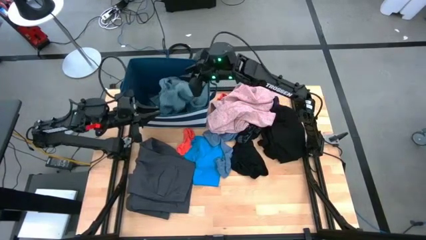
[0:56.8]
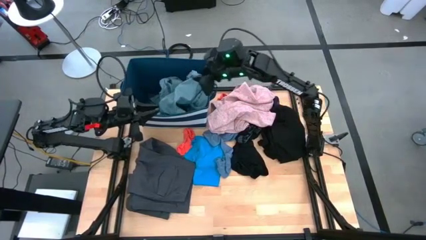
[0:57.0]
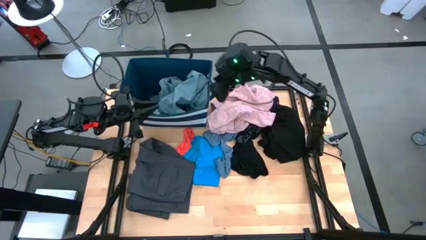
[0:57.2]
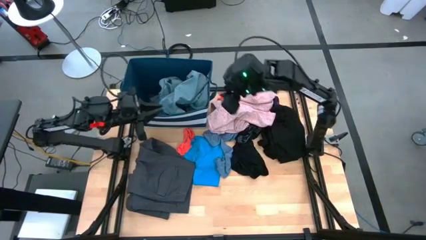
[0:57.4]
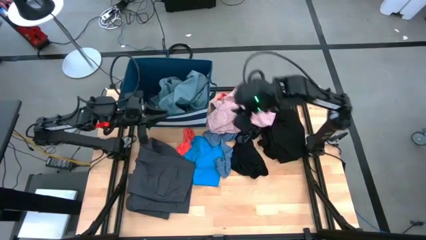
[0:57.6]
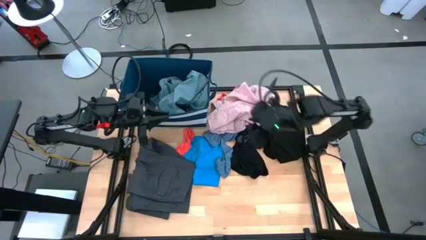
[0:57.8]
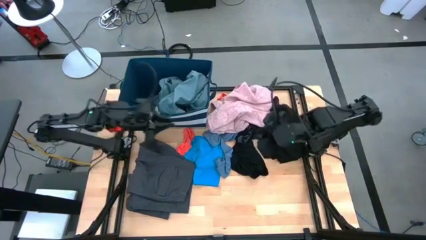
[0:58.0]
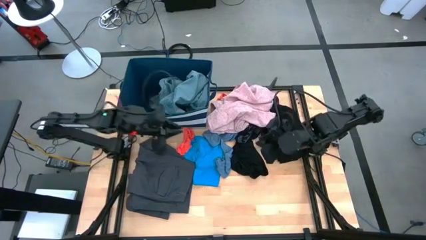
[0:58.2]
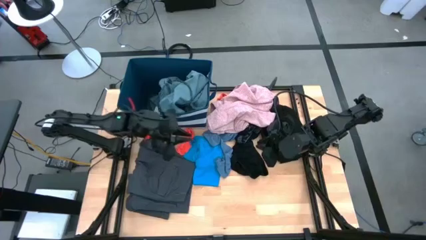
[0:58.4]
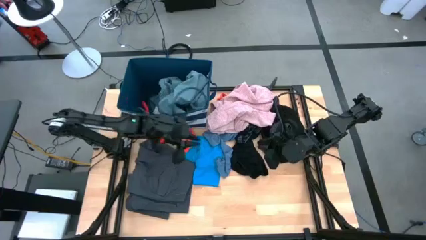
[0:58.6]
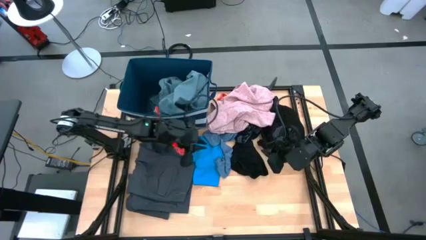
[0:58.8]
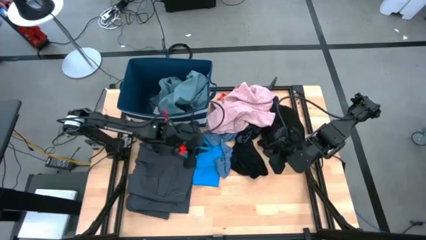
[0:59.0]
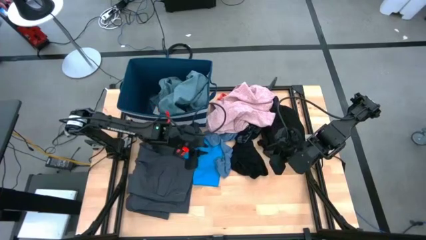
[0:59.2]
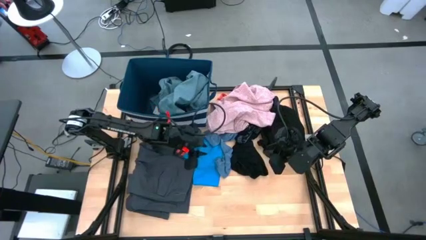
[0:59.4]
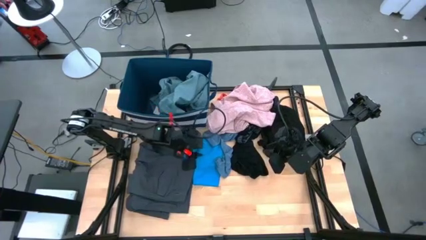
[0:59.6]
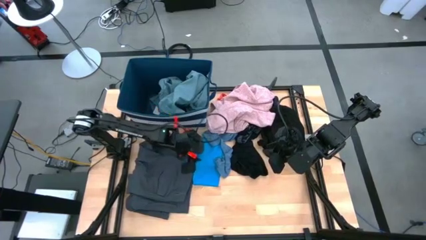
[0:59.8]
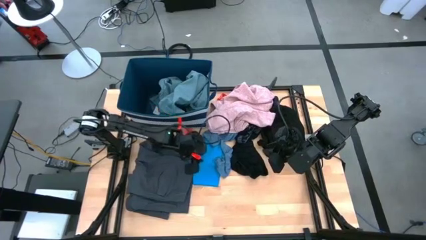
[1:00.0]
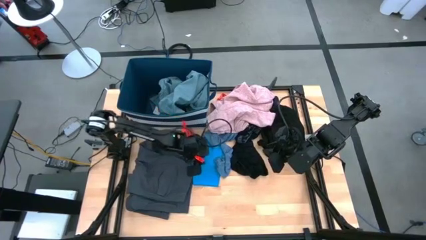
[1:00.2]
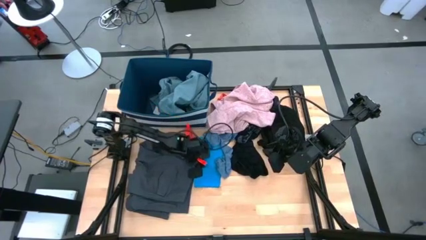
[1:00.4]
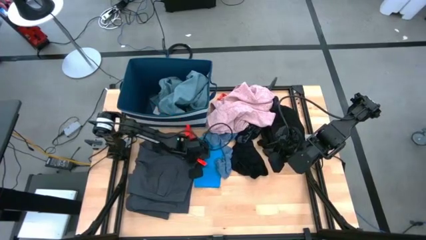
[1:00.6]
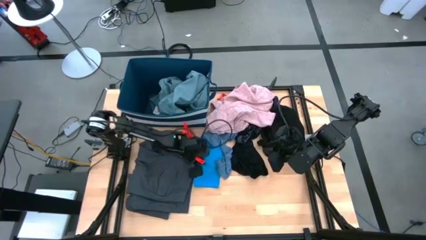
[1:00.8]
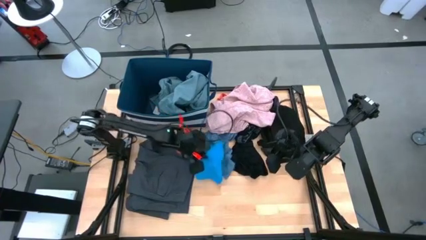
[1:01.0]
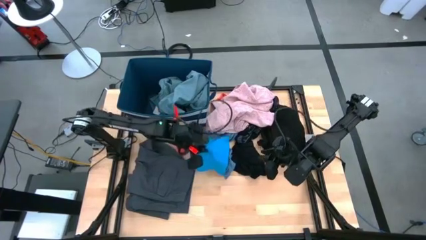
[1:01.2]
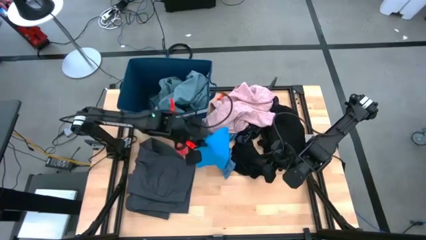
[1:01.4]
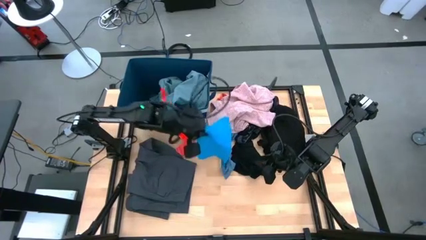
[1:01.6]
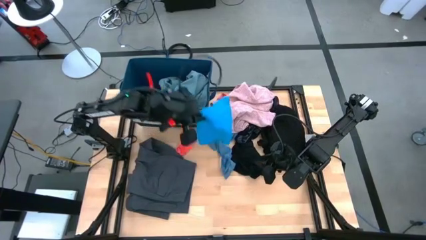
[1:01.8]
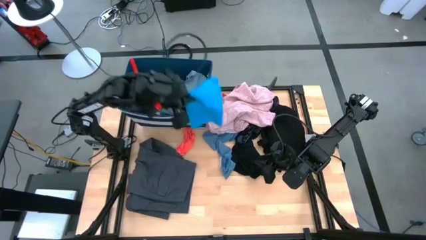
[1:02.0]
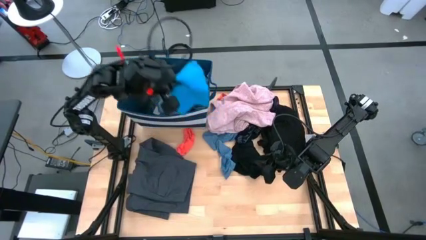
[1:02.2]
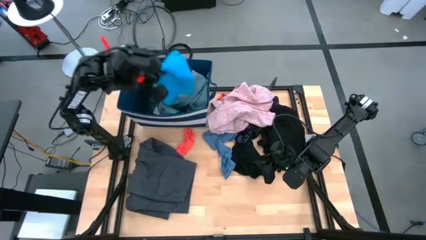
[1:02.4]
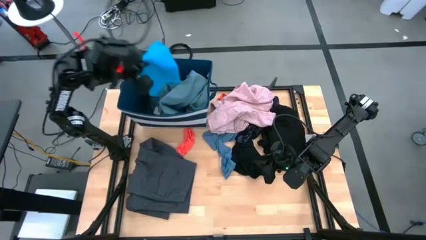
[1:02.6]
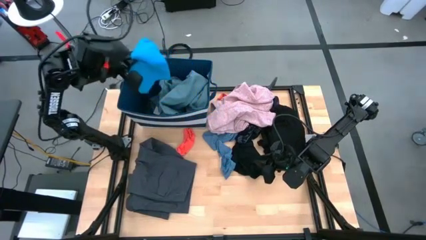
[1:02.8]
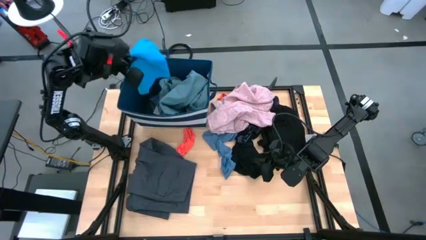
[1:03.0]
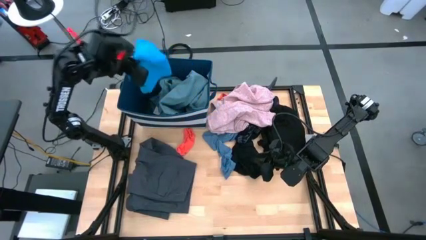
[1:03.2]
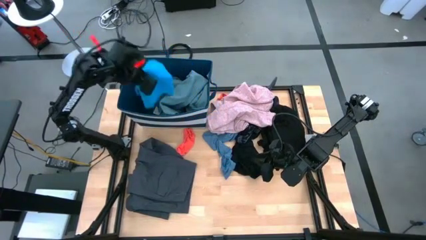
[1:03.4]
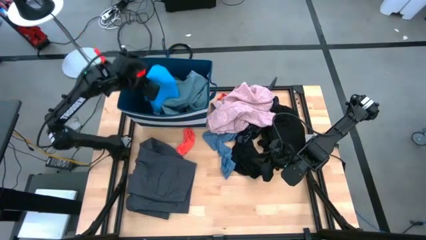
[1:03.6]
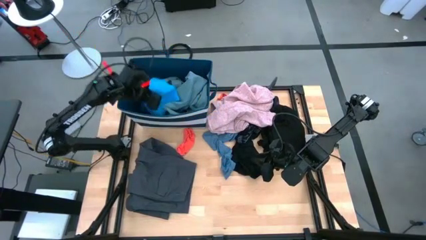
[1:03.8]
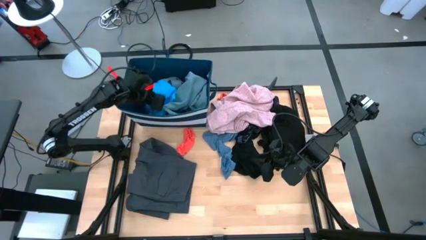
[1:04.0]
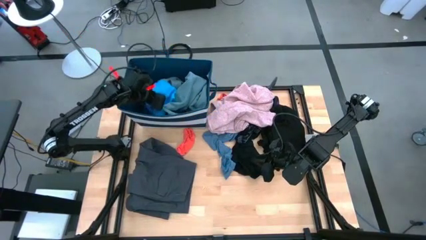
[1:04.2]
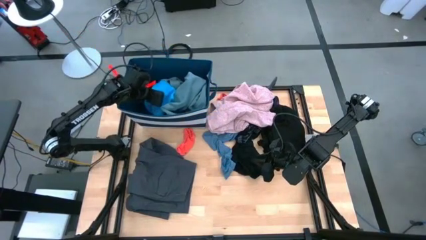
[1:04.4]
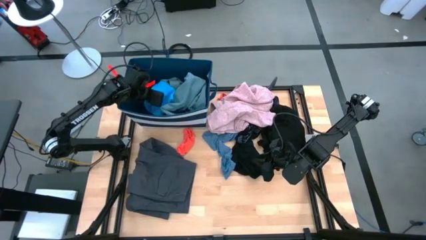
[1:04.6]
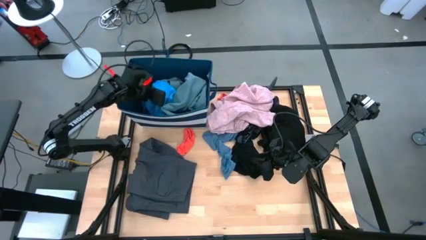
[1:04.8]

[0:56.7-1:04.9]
Task: Sort clothes
Put the blue t-shirt into the blue laundry bin

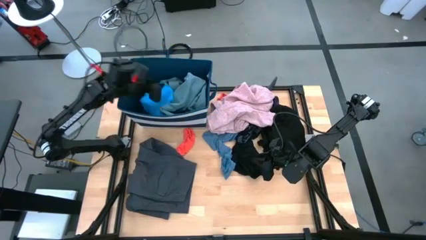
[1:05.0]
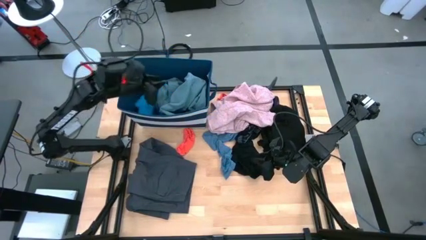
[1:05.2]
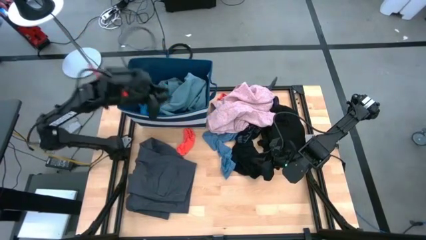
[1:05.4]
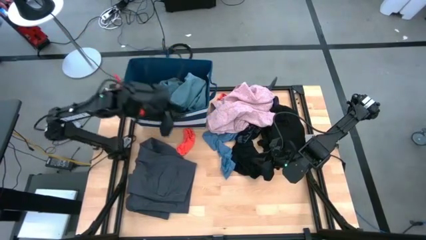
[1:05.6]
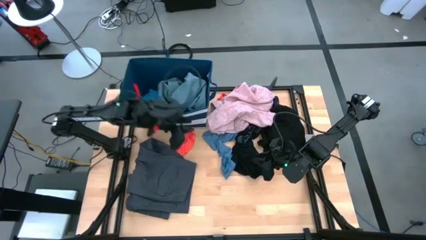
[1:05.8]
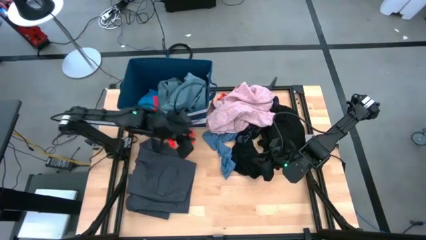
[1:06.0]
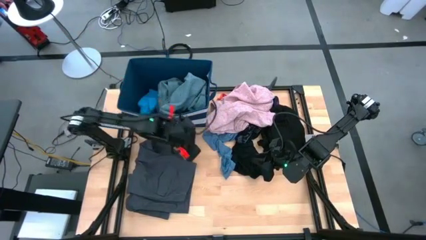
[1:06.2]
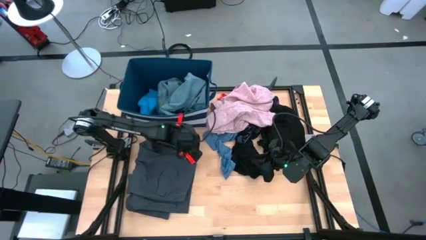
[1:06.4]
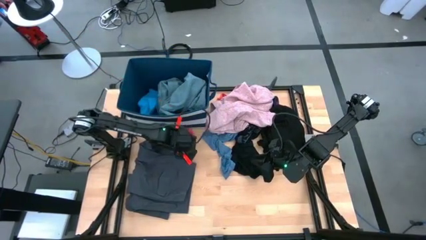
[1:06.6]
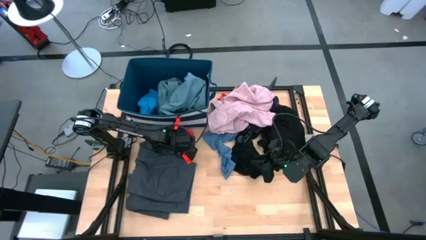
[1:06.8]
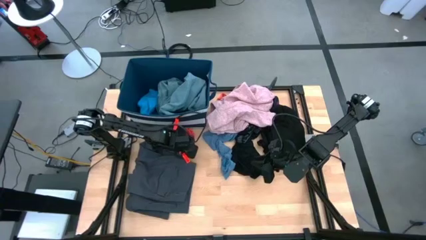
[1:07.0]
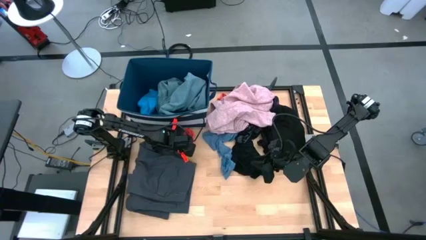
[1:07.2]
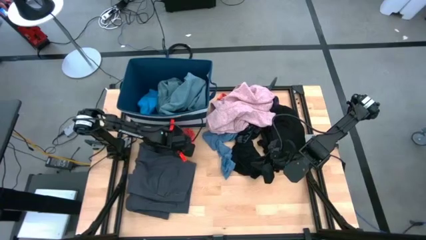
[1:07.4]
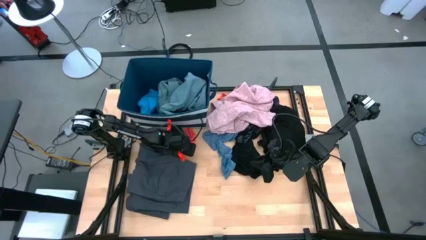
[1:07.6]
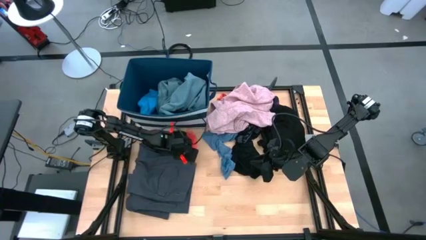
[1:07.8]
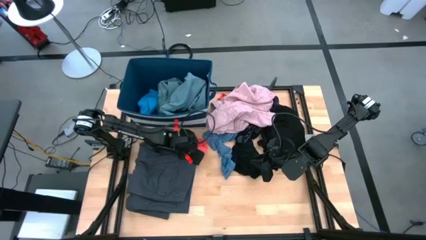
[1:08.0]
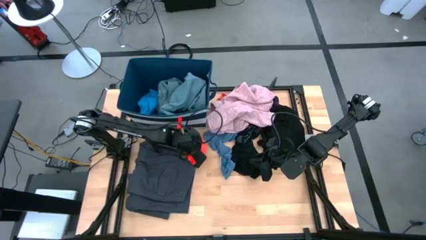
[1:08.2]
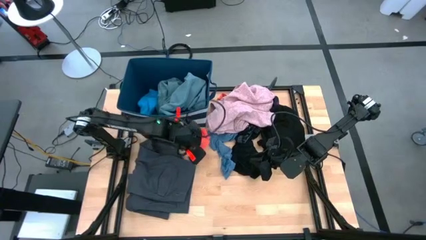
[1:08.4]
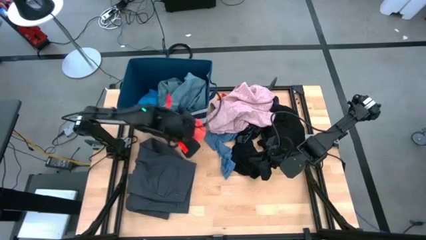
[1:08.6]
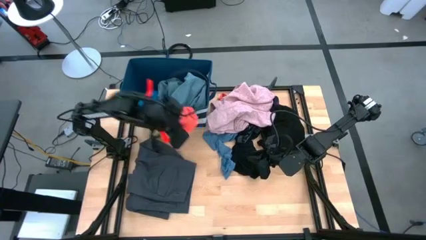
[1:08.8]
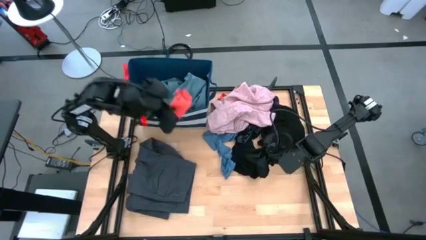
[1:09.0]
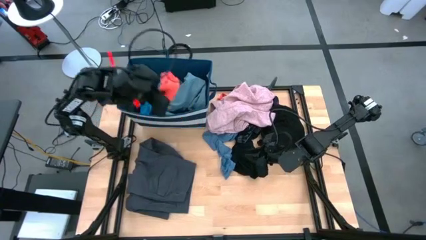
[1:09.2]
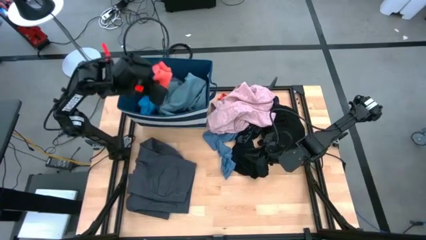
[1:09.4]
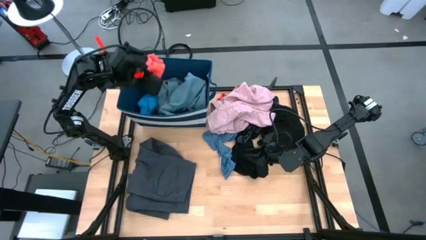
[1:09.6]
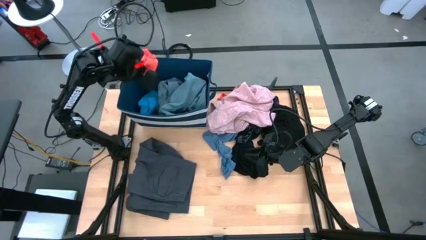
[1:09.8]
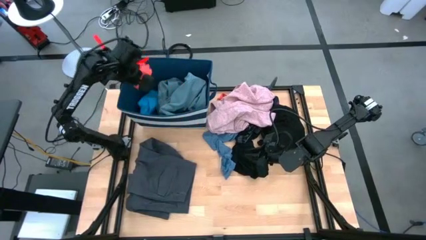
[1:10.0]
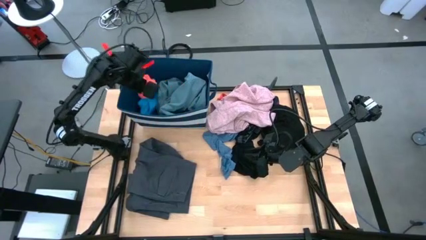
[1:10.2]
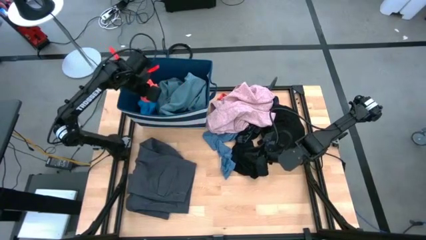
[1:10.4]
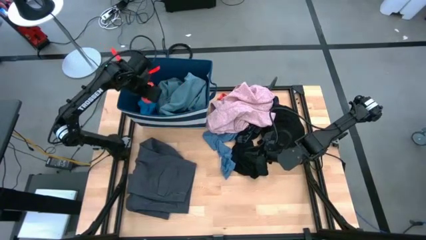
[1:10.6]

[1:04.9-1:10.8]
Put the orange sock into the blue laundry bin
